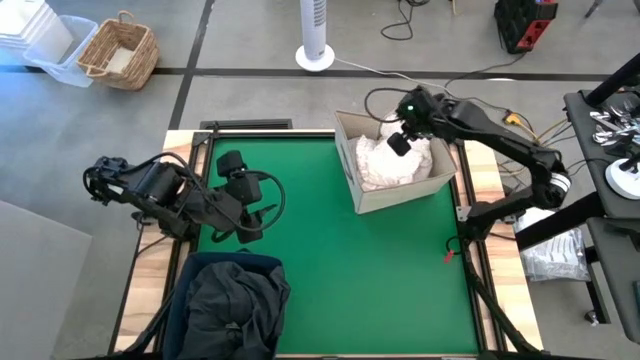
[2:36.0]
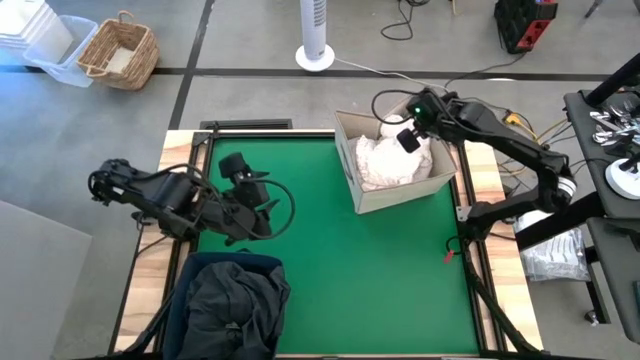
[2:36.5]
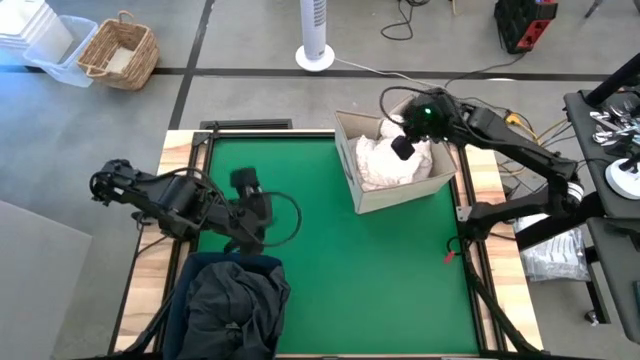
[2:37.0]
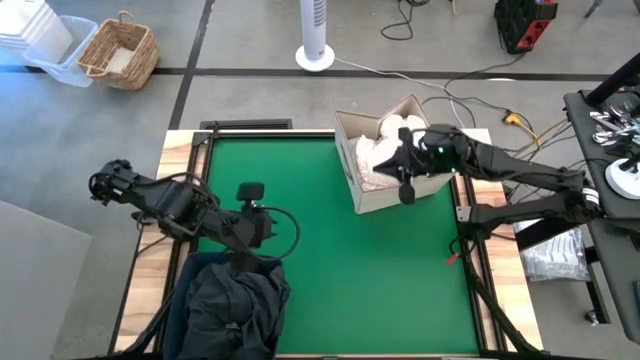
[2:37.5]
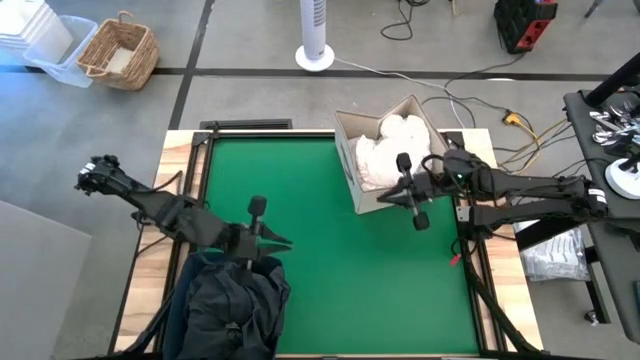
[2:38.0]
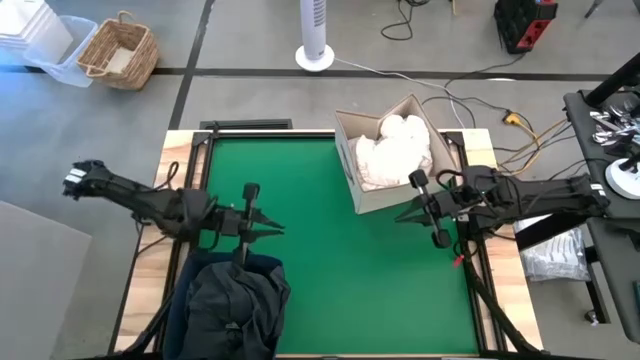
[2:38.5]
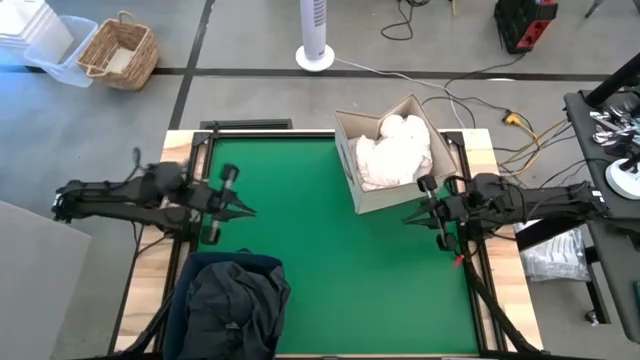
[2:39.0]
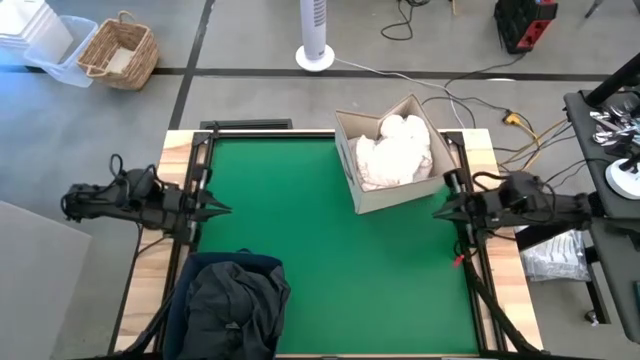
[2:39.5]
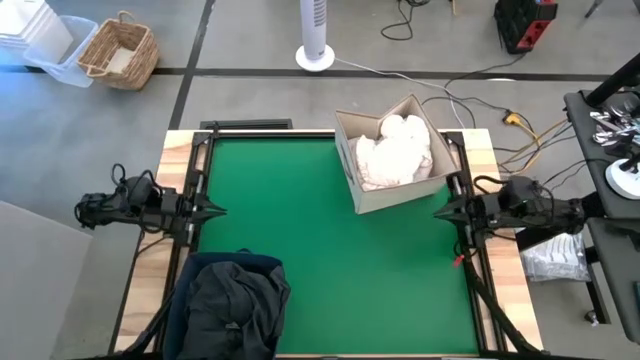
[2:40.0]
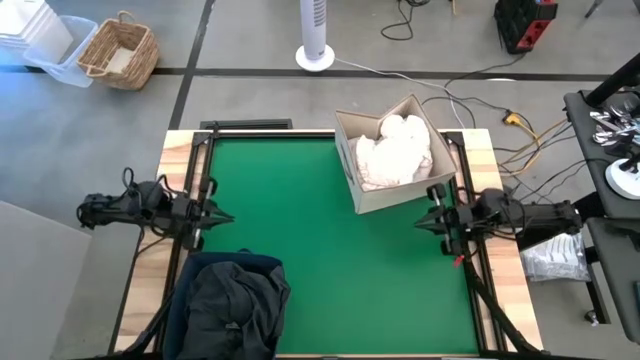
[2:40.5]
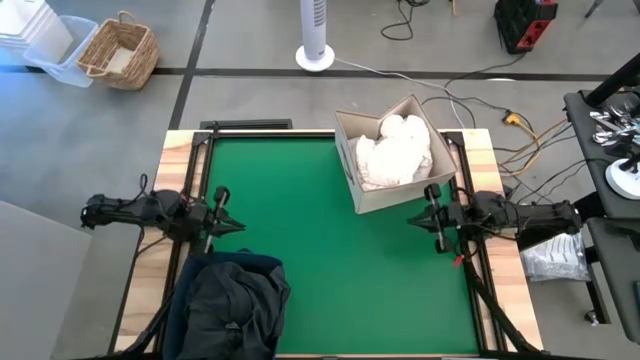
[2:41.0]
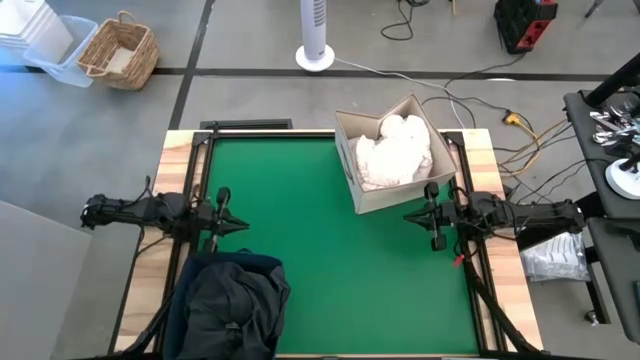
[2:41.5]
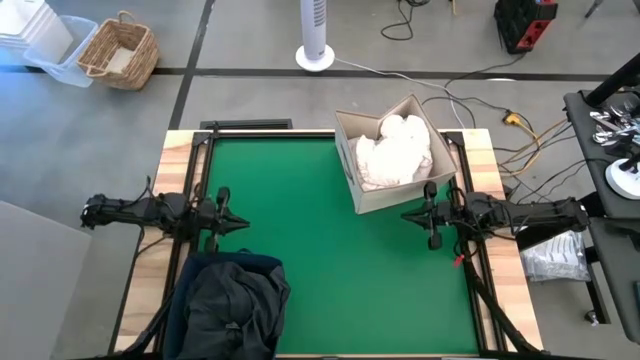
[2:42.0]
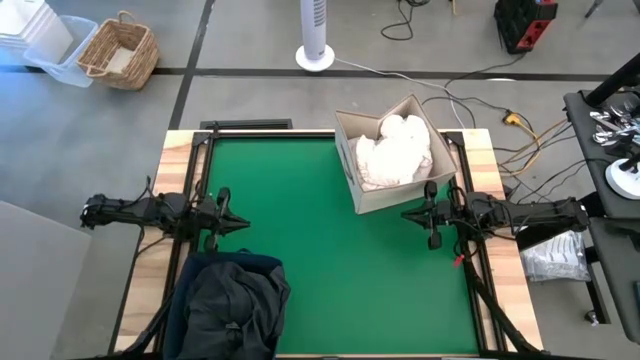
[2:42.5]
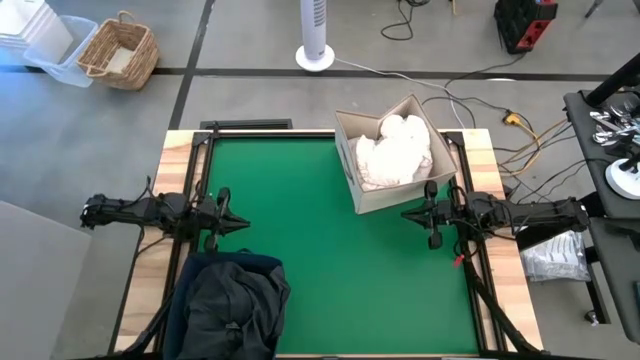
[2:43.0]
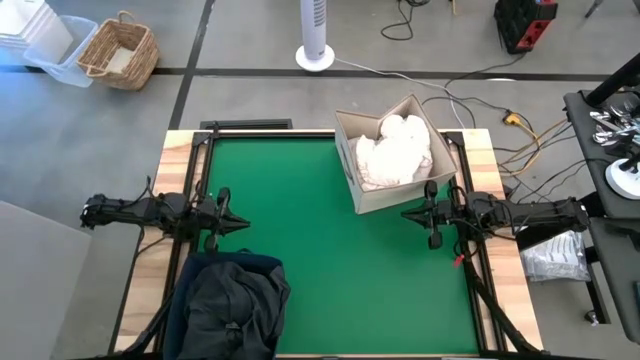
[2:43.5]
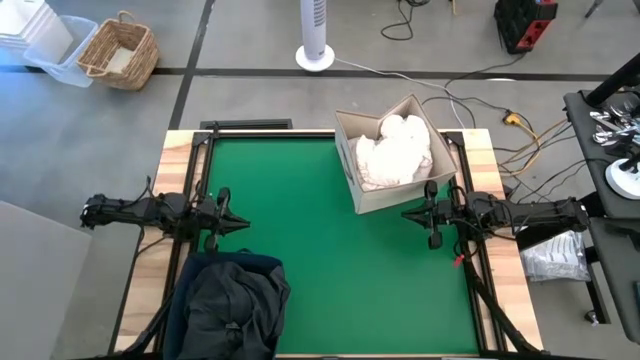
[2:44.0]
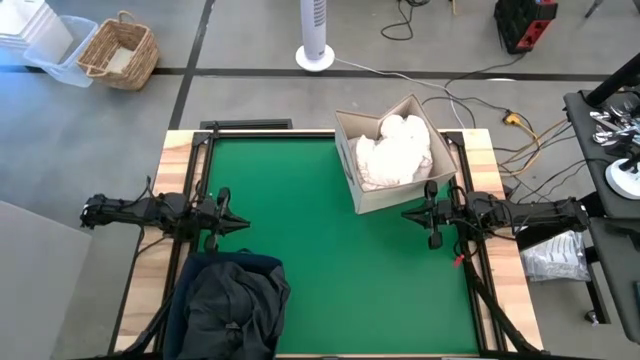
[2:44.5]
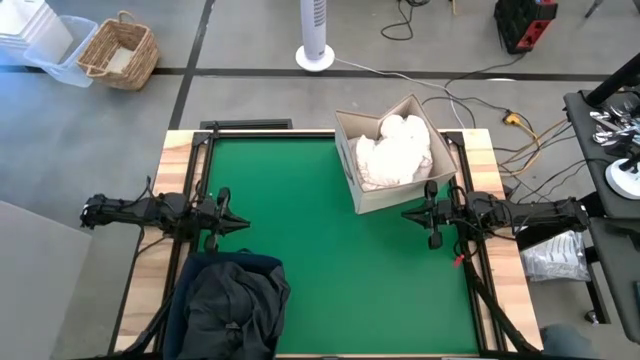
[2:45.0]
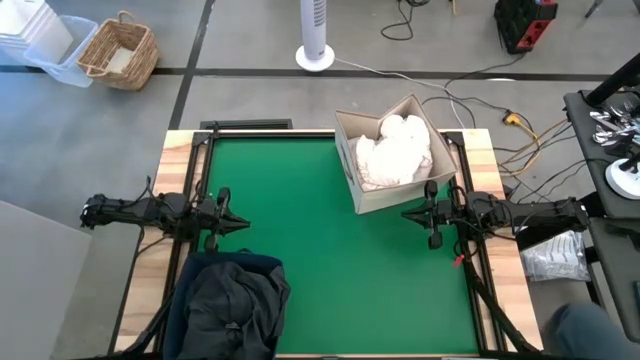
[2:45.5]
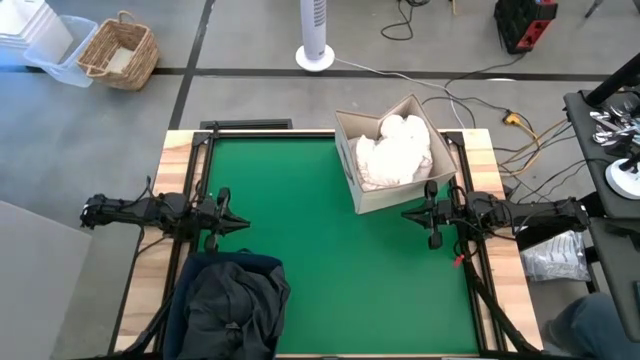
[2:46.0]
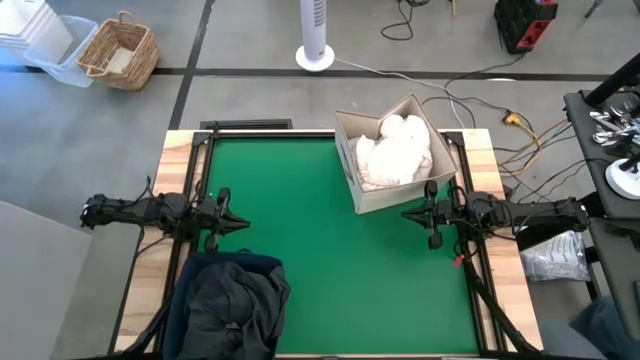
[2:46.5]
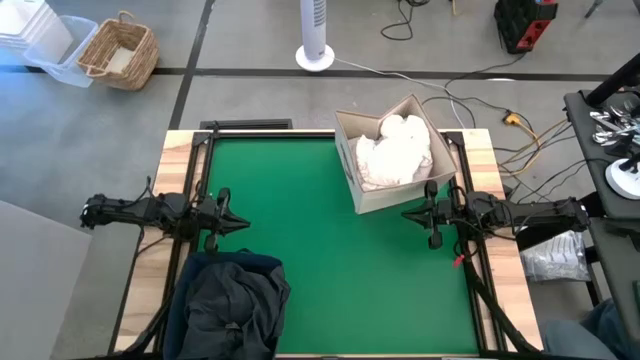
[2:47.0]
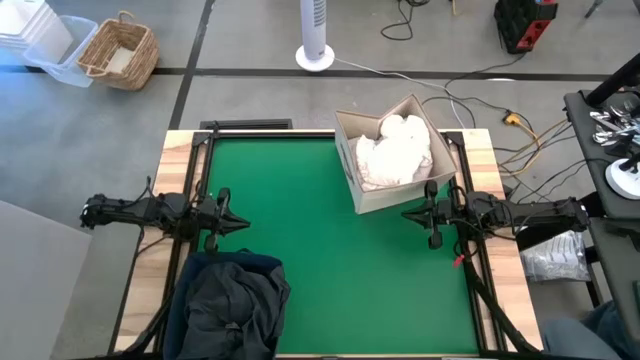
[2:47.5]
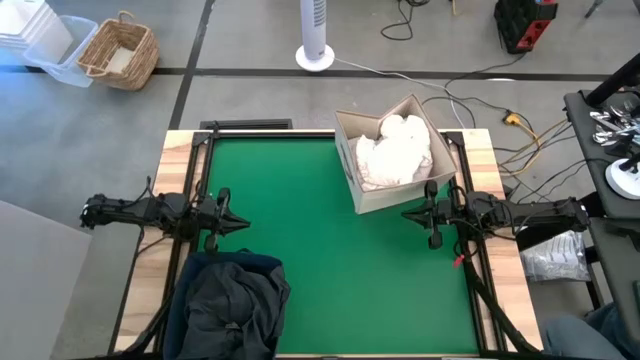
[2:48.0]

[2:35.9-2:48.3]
Return to Home Position

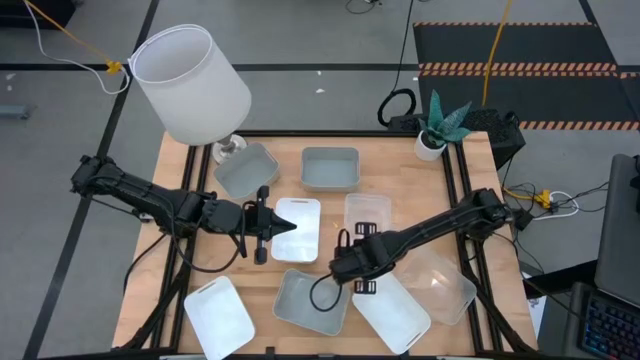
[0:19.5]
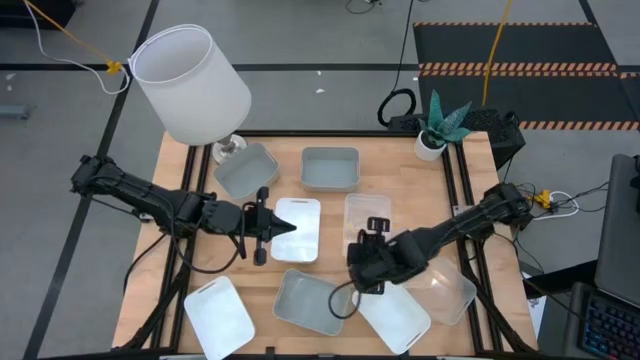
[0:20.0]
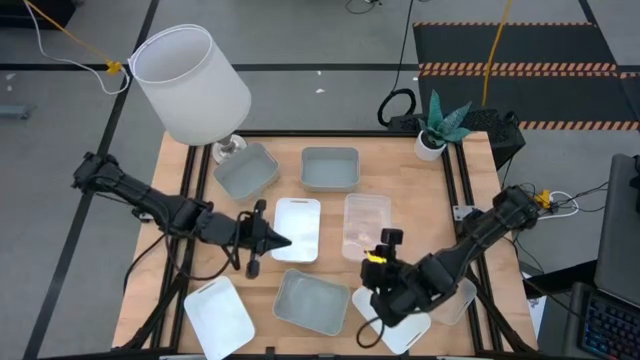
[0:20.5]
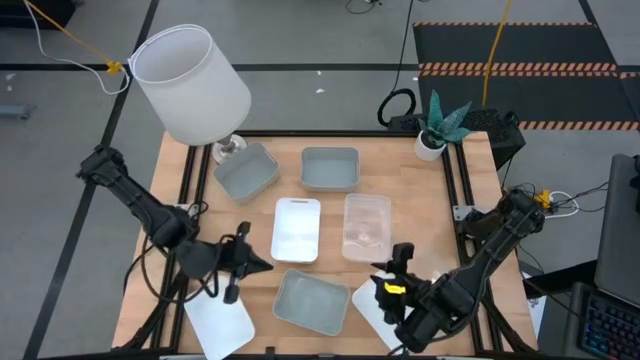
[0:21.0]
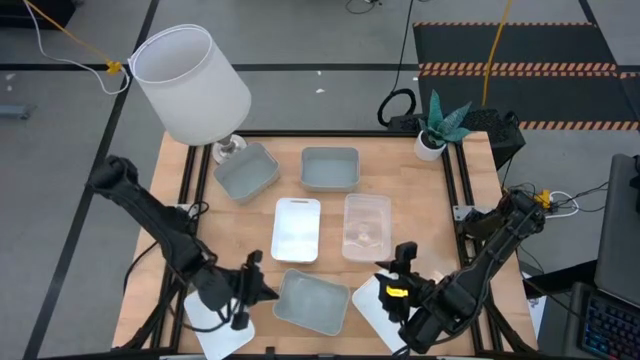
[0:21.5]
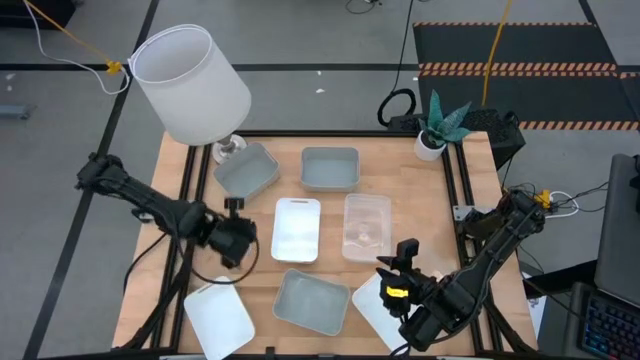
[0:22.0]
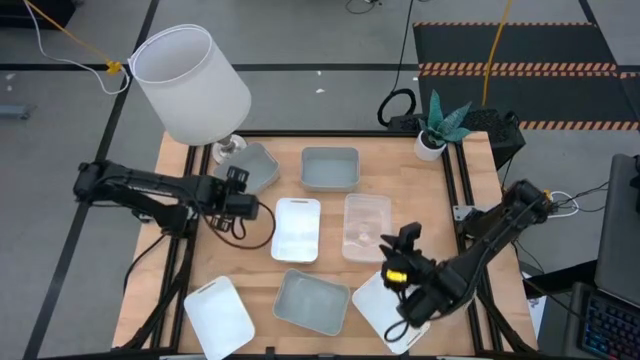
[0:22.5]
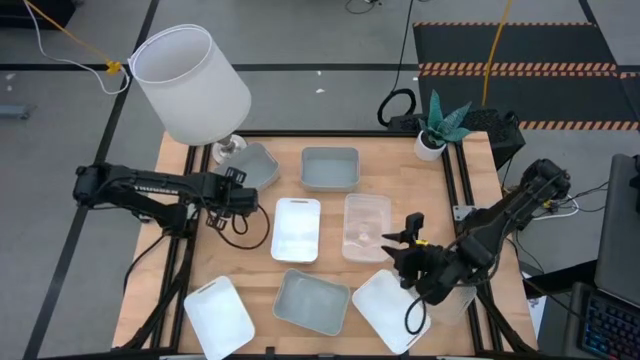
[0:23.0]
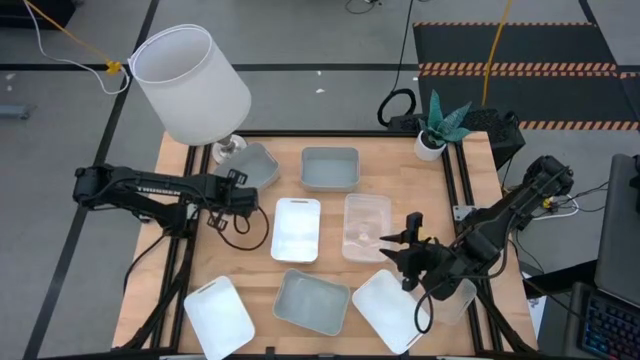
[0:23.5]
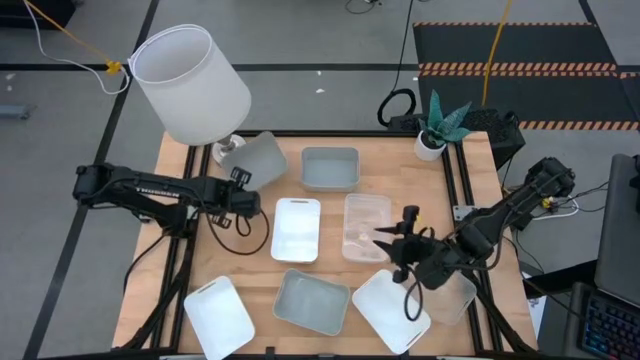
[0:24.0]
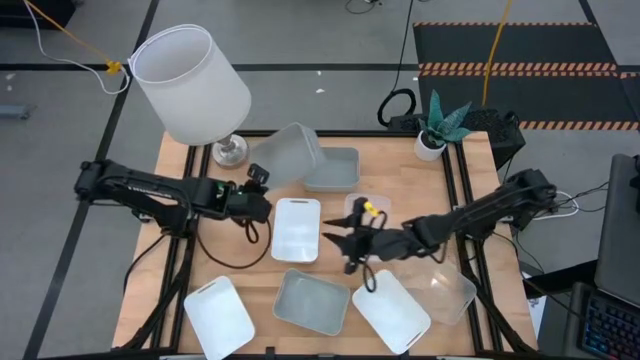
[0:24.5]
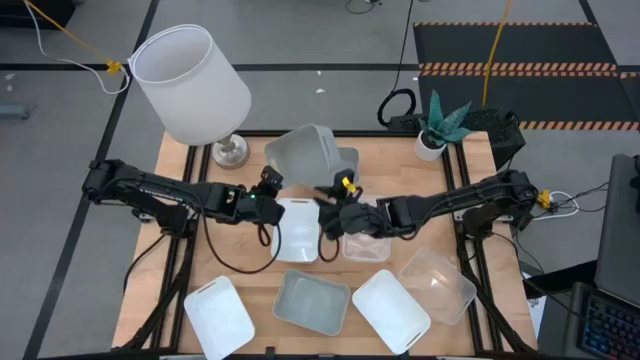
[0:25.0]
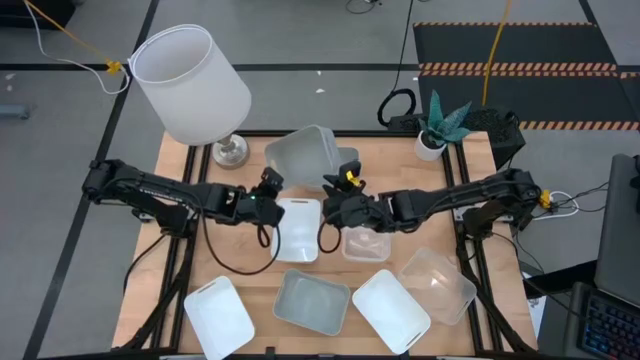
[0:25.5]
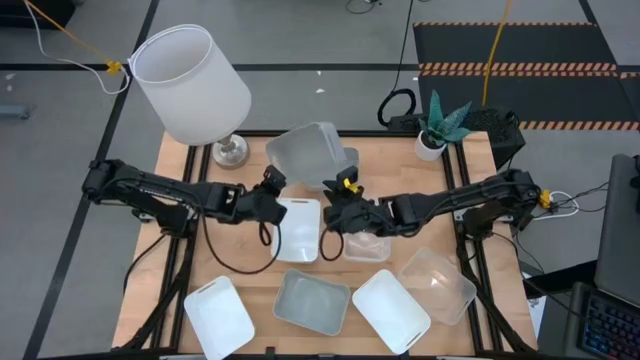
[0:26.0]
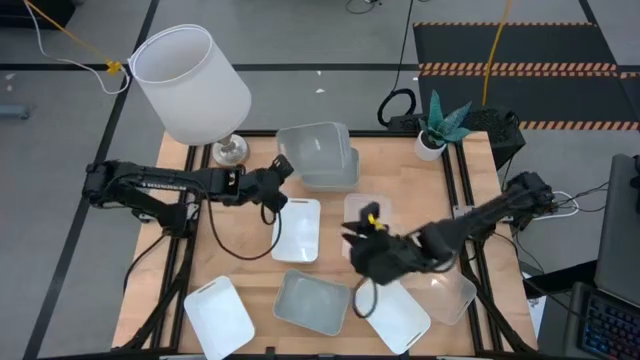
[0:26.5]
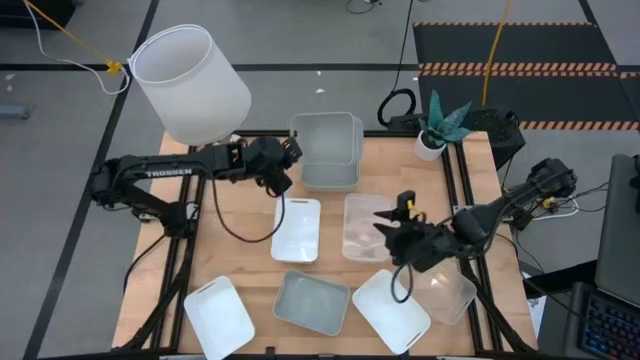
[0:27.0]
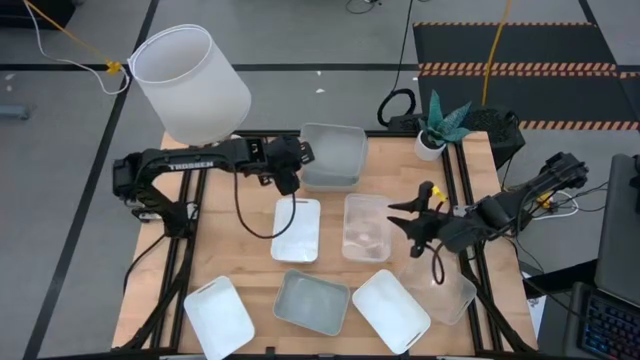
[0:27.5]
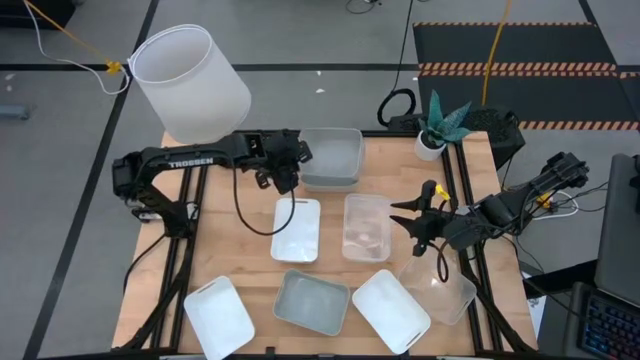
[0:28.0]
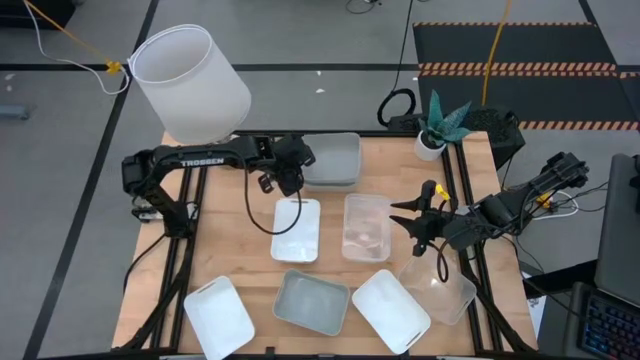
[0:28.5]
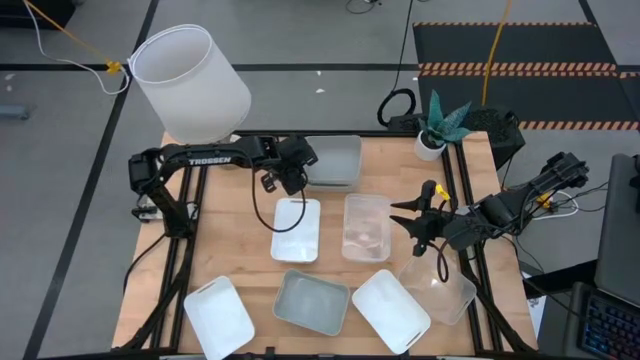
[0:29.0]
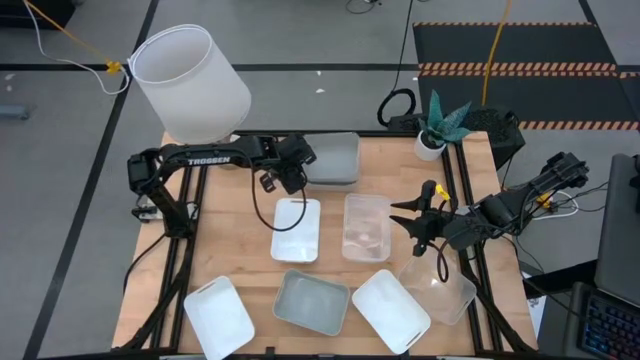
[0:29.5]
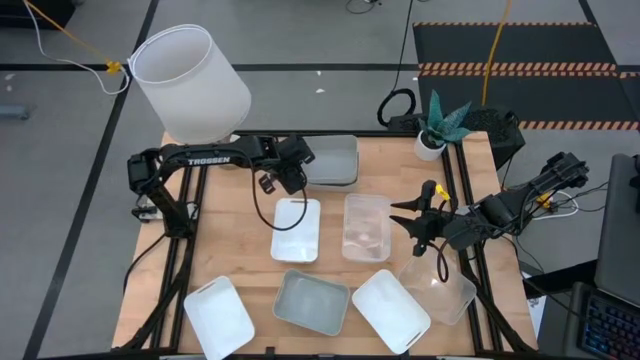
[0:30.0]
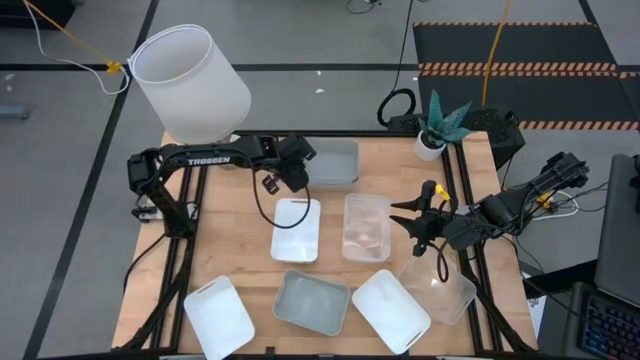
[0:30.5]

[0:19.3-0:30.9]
Stack the top left gray bin on top of the top right gray bin
